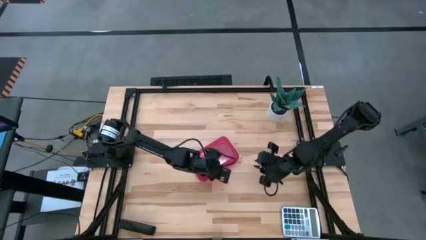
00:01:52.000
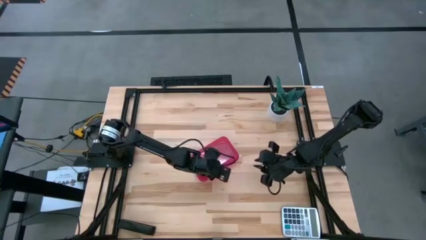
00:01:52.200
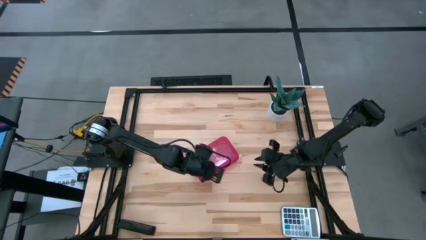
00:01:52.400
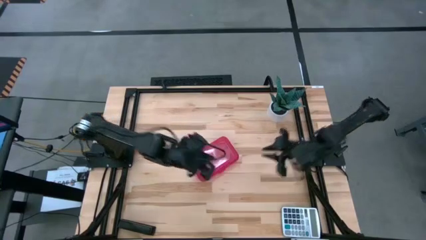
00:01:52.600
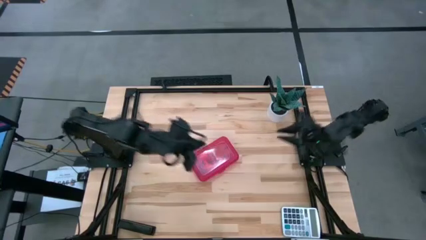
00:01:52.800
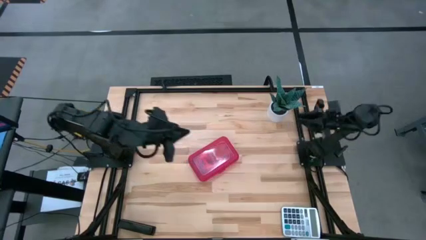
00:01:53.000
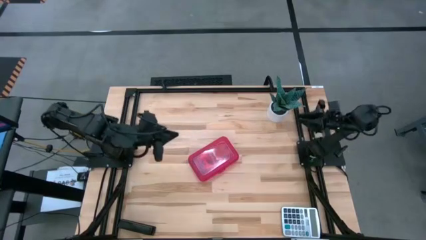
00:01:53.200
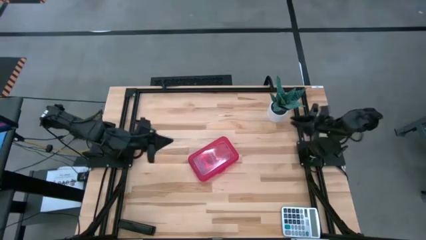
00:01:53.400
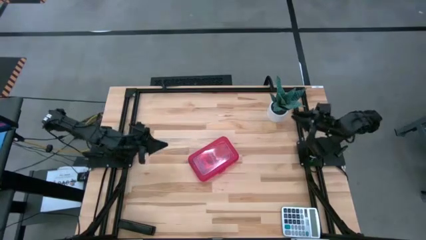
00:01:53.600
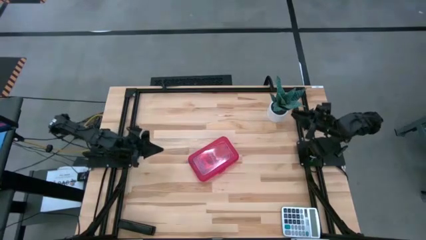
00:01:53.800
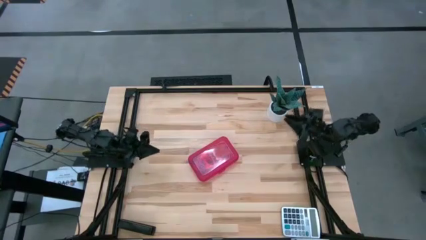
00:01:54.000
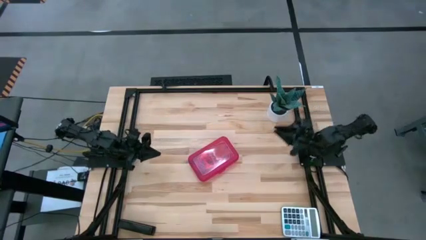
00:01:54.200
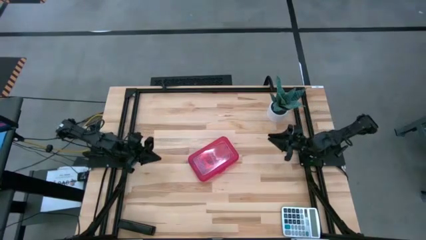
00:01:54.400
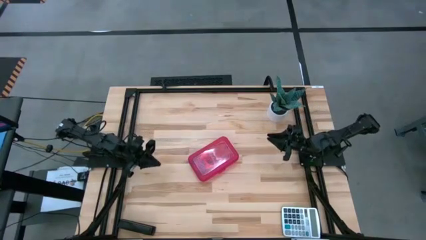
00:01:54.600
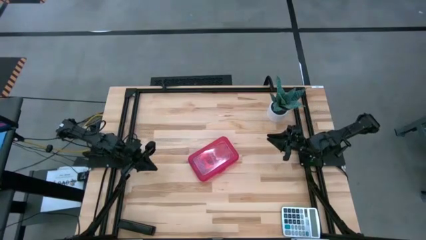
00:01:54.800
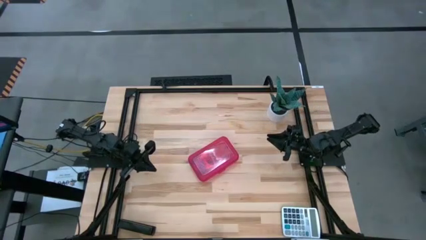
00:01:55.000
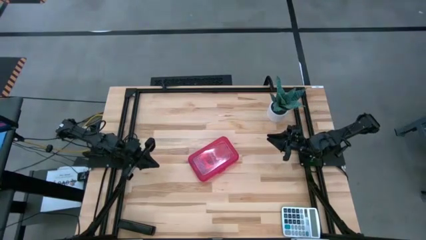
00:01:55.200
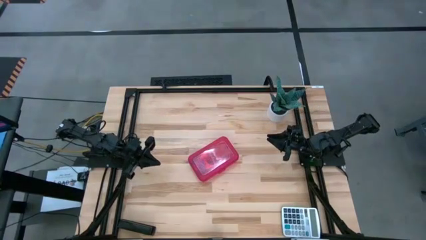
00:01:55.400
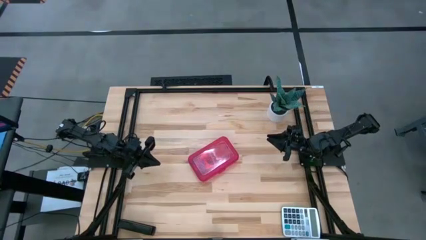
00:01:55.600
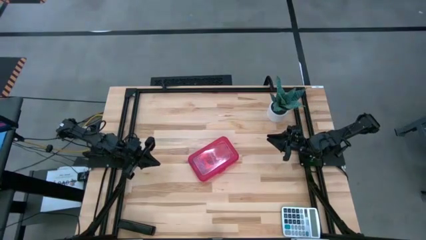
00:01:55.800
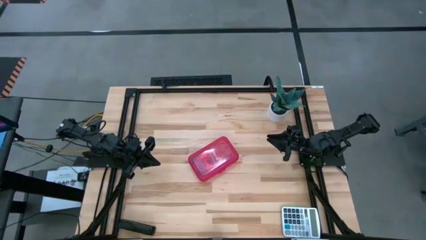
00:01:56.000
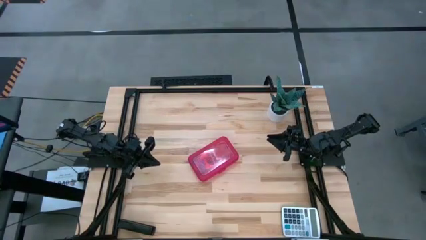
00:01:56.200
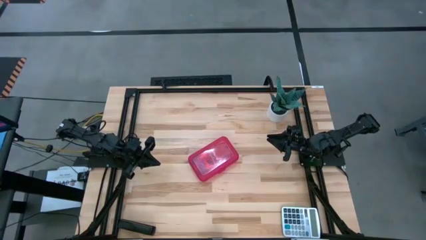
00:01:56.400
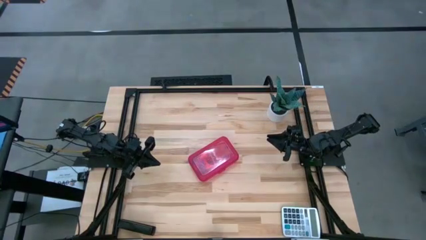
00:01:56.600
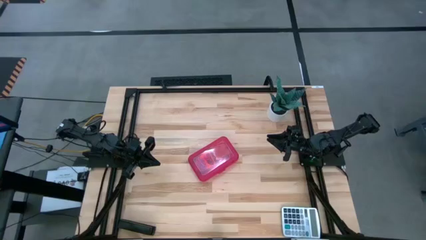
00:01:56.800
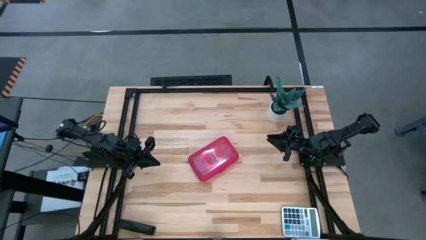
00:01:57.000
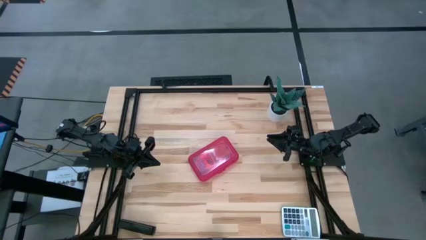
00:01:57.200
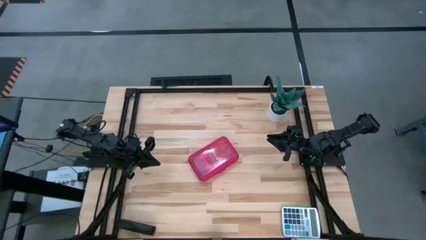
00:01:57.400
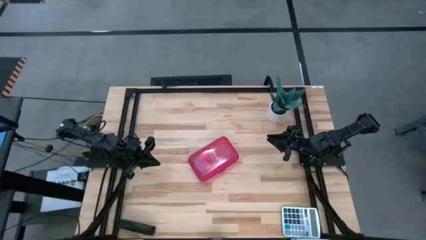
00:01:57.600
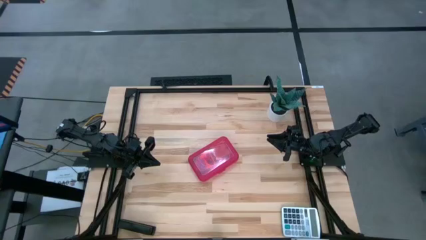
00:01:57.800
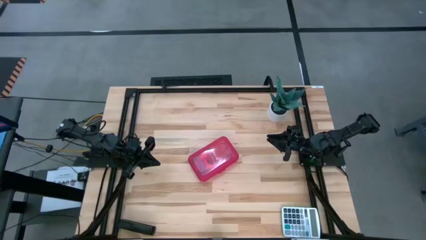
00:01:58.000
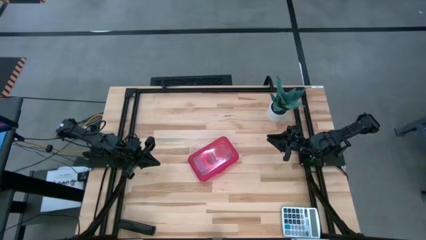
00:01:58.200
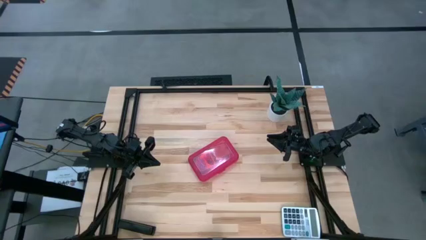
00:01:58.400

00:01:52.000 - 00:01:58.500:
Task: Pack school essentials
Return to Home Position

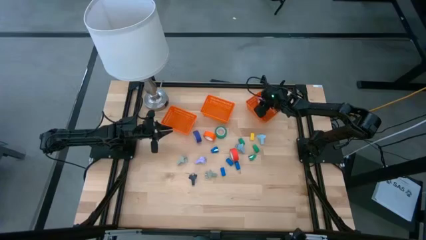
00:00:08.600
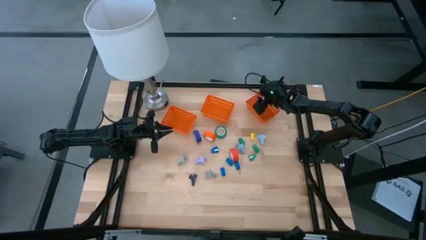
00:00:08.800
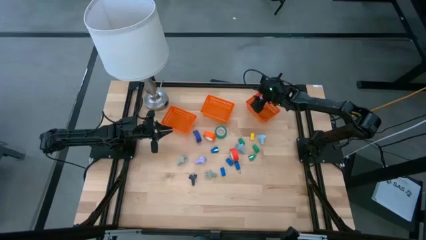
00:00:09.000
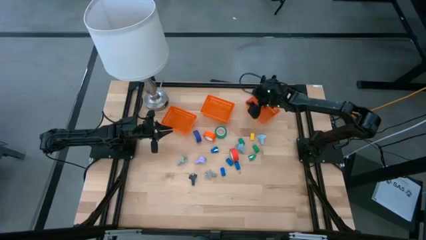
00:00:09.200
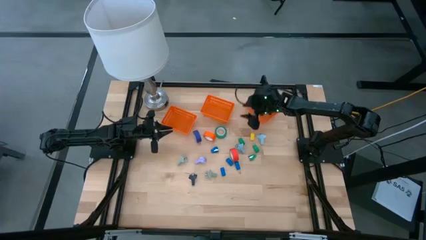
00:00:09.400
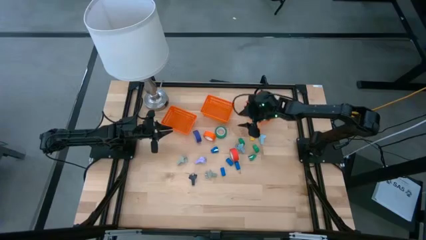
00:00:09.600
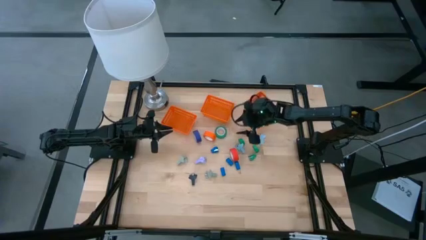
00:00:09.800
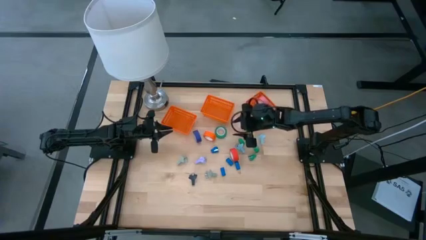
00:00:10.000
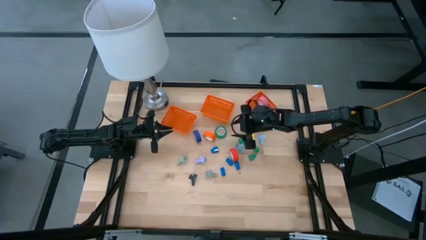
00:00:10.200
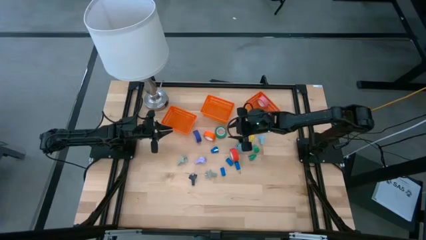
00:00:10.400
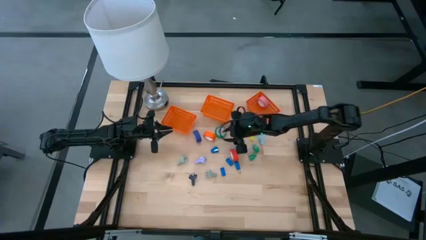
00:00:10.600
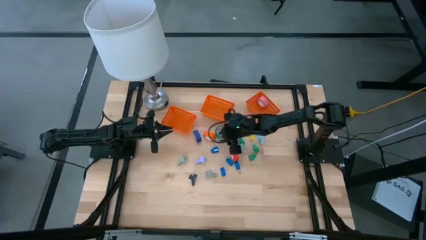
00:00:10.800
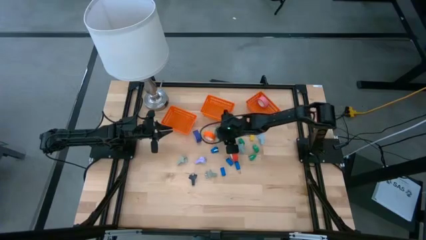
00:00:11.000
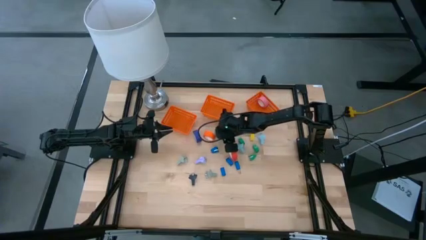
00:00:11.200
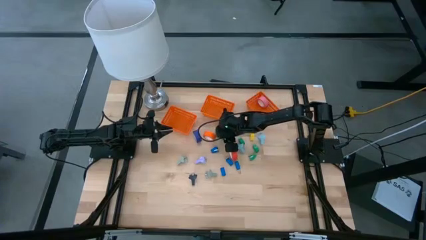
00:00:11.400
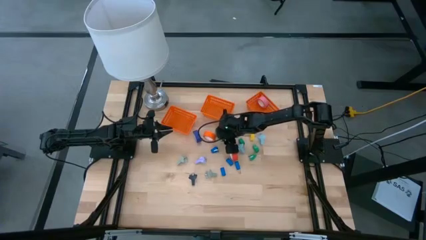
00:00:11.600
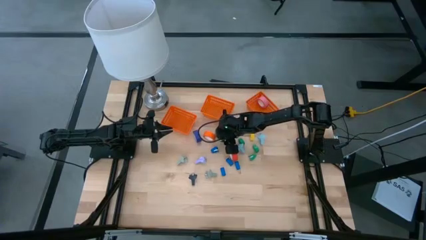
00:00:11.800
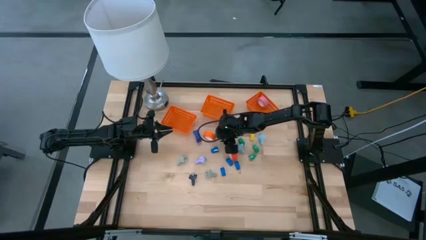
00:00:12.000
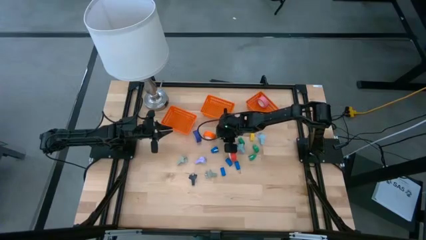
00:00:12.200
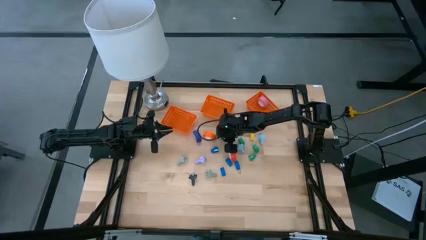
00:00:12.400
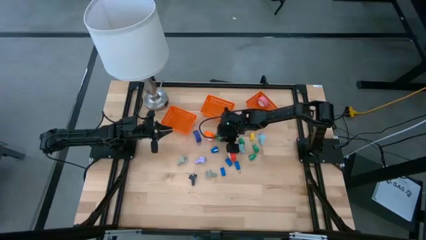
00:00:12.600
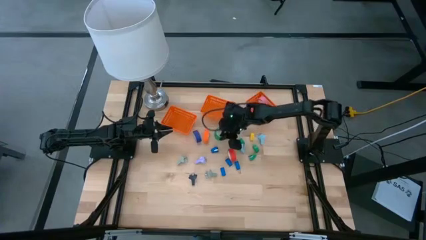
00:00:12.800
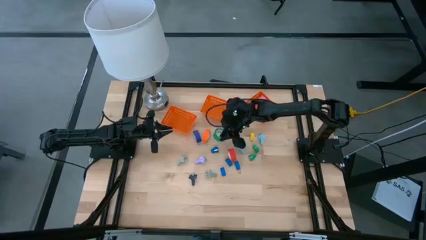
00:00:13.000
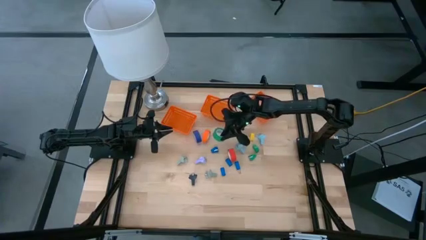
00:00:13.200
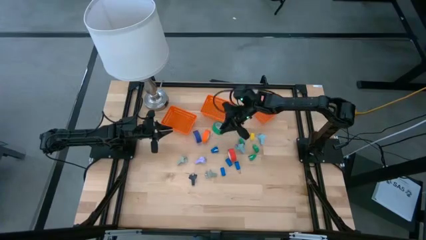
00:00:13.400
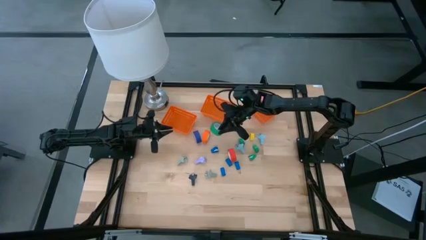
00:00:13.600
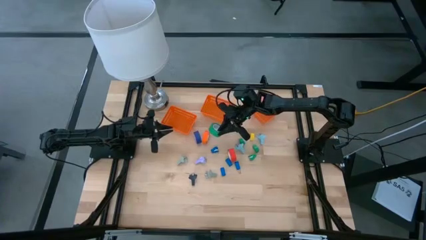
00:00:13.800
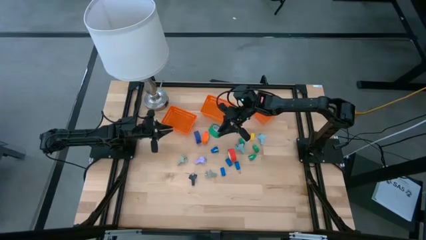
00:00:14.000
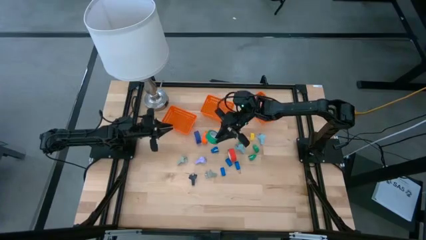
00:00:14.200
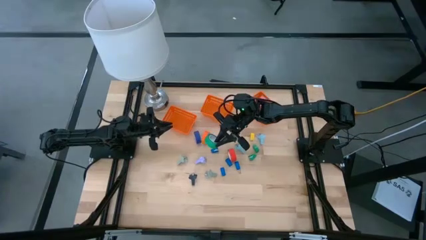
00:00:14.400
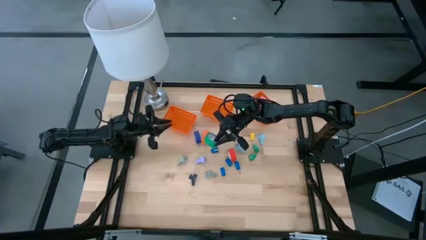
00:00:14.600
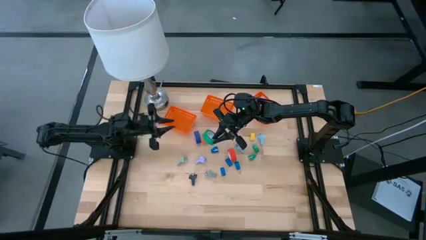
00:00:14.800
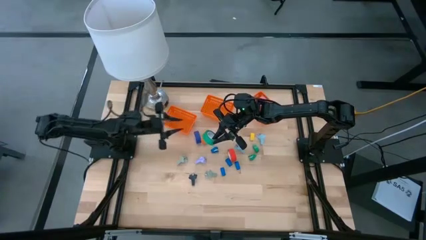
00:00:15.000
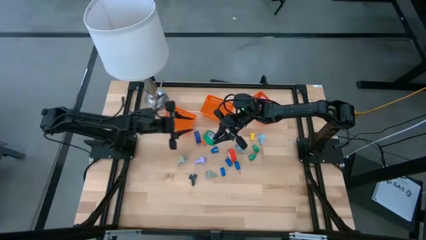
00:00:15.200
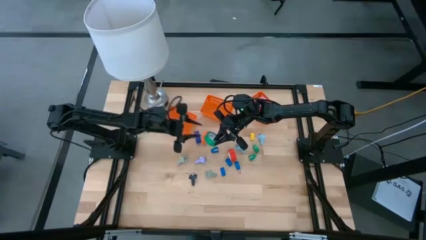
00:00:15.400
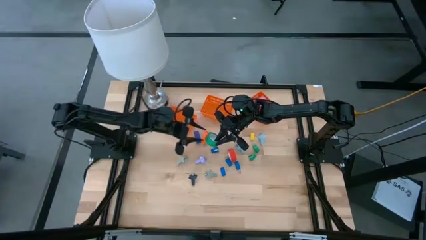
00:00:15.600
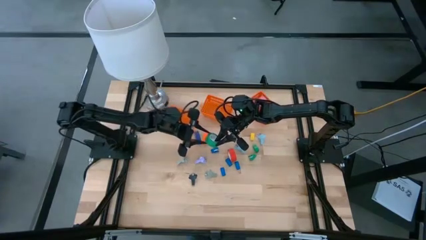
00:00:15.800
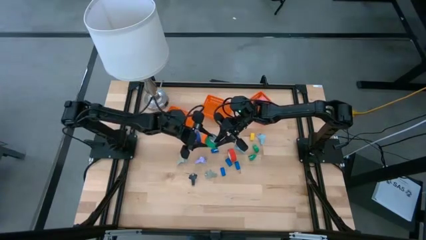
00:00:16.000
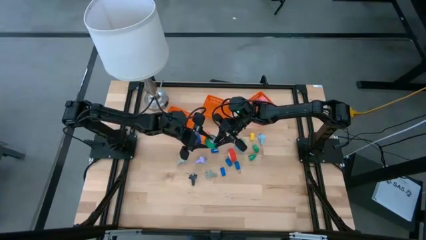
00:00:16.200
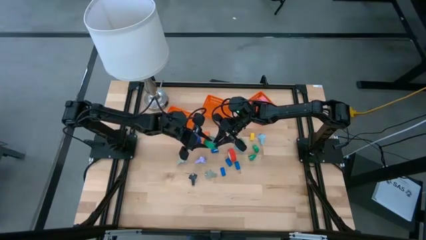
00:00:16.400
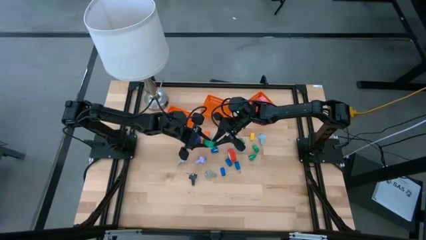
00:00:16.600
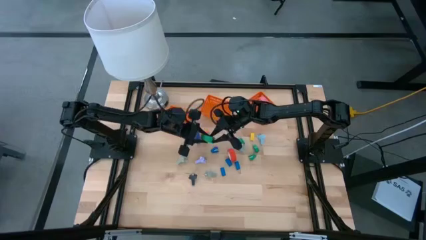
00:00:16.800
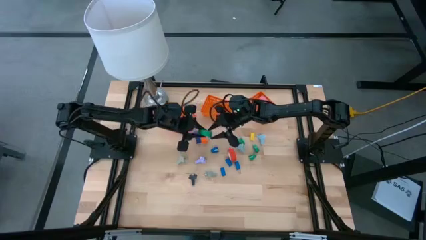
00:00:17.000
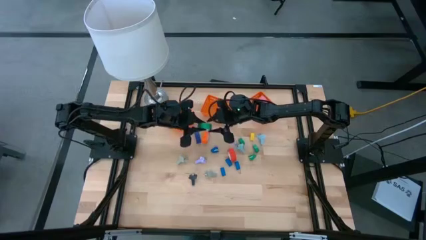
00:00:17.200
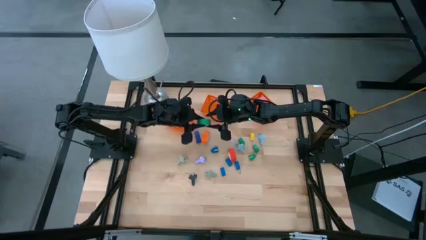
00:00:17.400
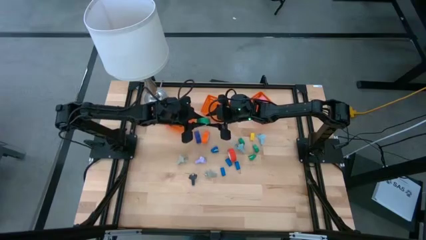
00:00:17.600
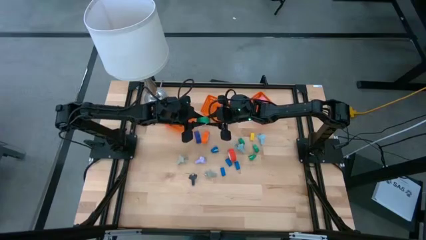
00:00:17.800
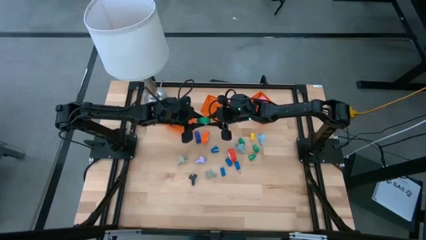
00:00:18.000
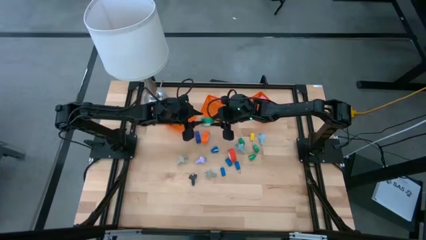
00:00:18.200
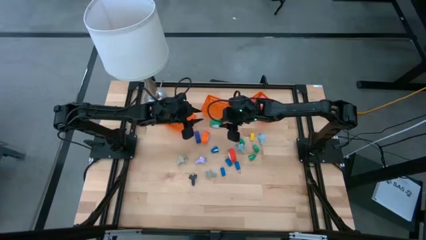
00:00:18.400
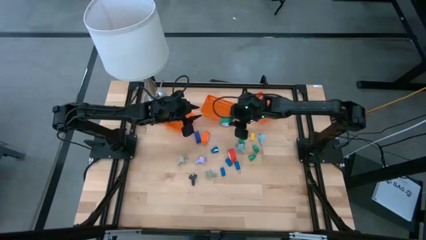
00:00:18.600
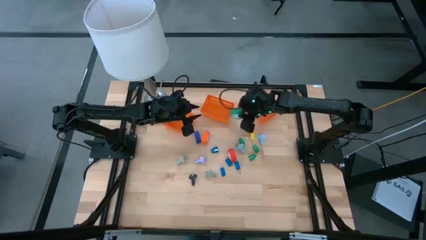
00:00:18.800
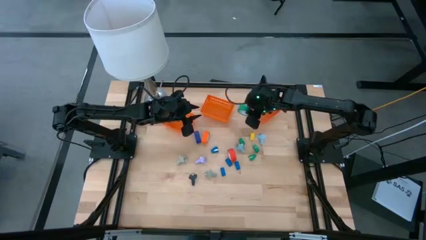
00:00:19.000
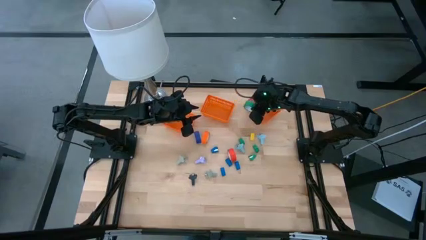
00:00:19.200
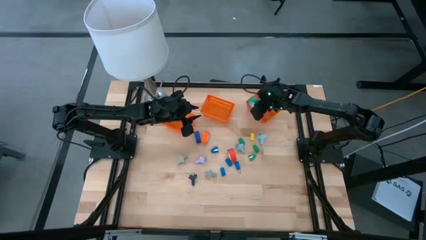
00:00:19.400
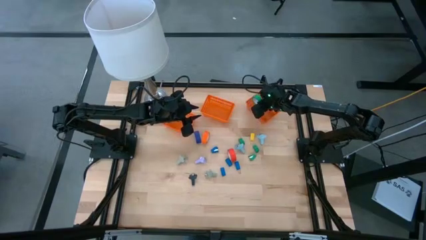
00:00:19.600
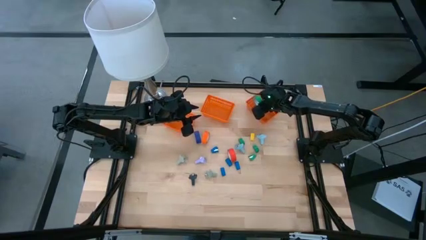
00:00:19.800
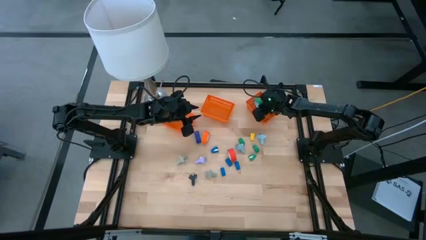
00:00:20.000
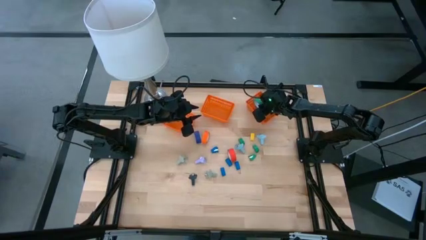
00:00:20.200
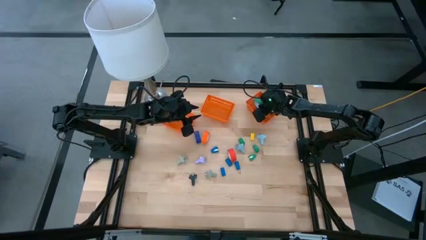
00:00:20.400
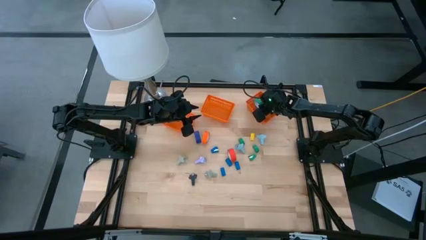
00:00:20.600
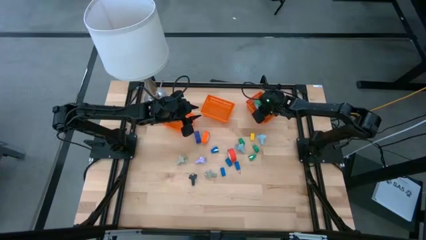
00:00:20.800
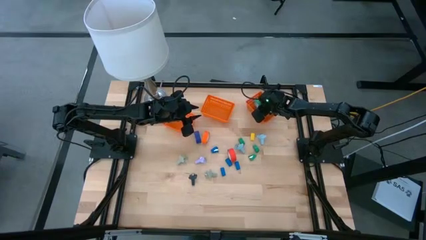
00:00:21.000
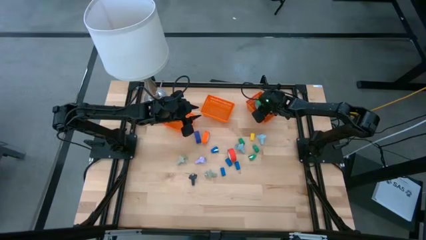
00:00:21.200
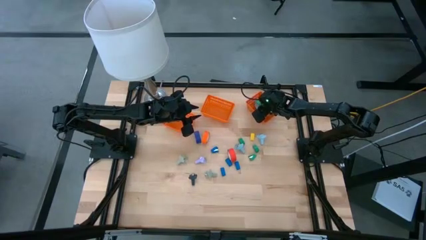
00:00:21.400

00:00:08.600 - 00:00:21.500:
Task: Pick and place Stapler, Stapler remover, tape
Put the green tape into the right orange bin
